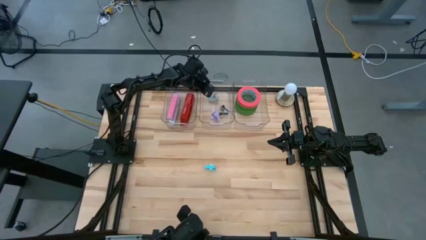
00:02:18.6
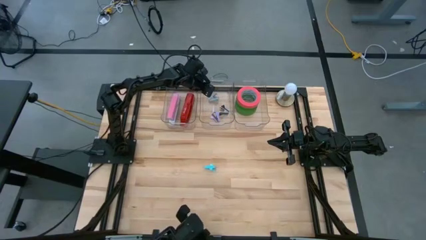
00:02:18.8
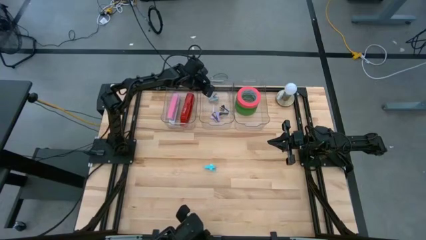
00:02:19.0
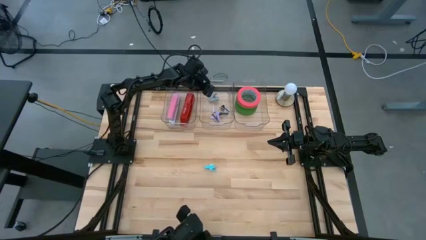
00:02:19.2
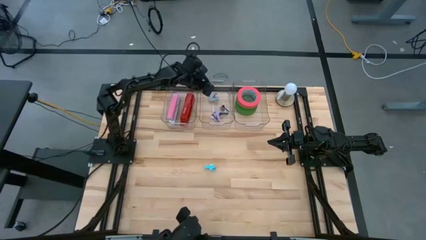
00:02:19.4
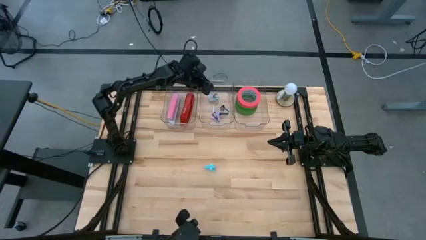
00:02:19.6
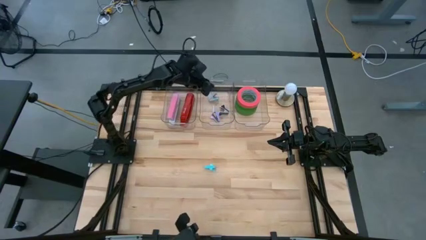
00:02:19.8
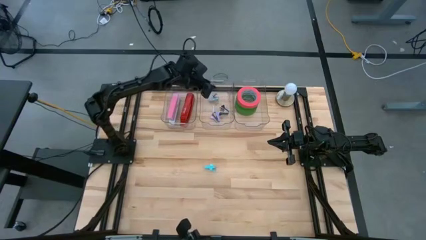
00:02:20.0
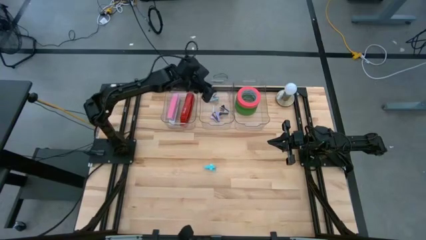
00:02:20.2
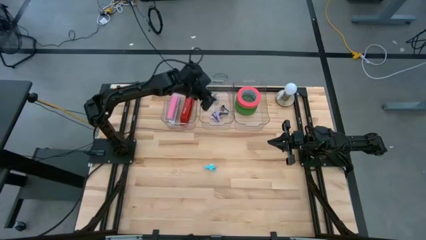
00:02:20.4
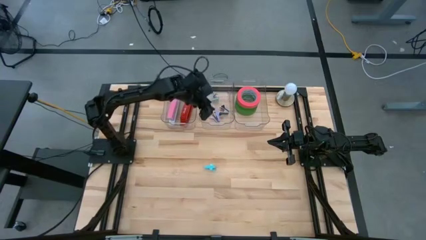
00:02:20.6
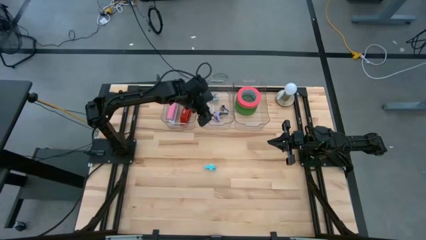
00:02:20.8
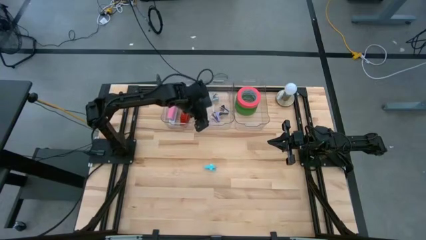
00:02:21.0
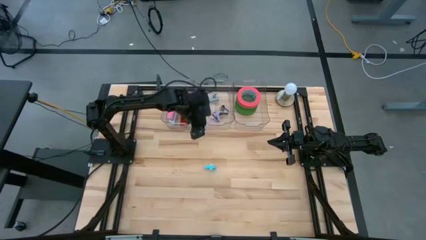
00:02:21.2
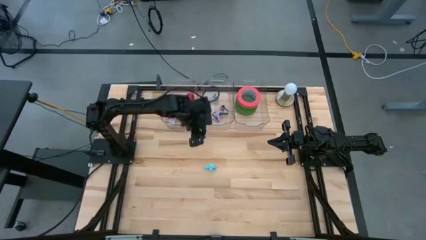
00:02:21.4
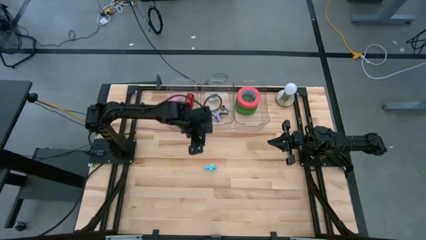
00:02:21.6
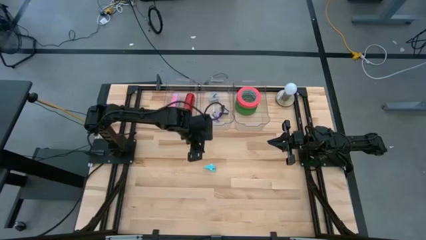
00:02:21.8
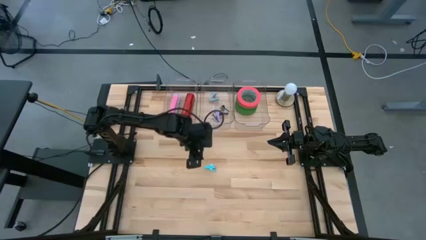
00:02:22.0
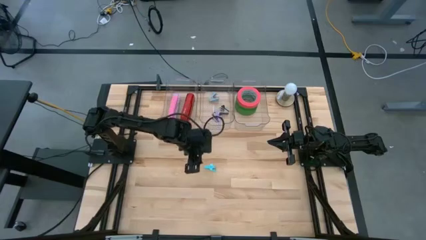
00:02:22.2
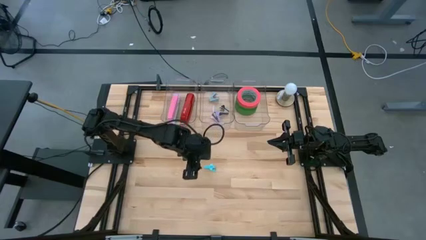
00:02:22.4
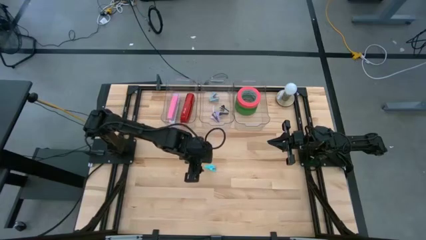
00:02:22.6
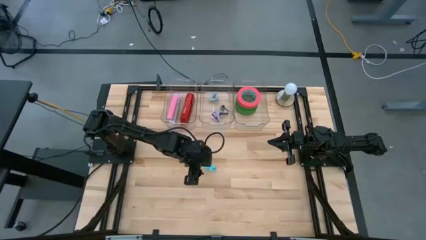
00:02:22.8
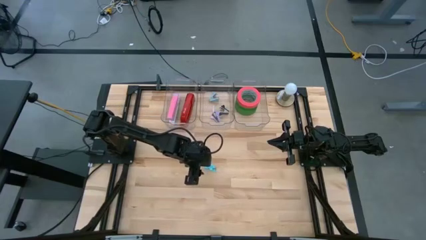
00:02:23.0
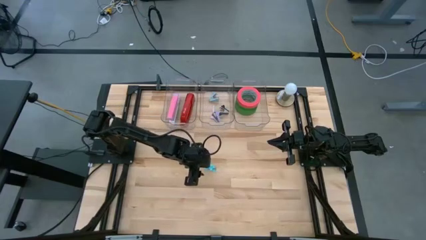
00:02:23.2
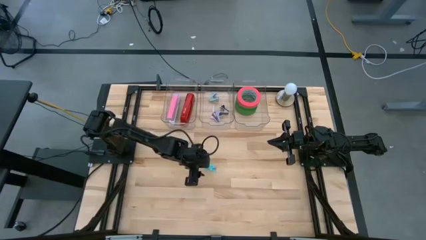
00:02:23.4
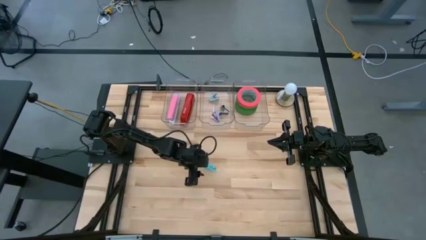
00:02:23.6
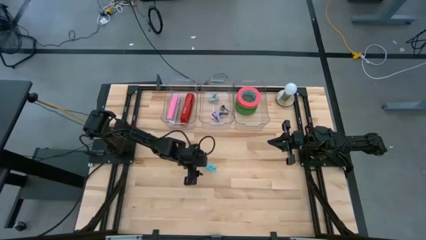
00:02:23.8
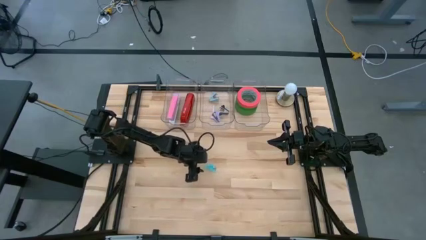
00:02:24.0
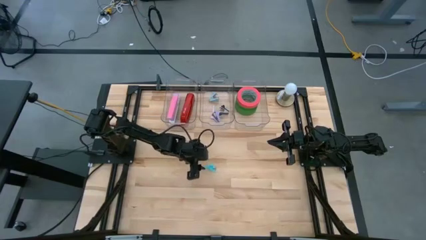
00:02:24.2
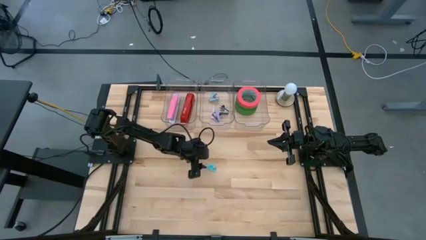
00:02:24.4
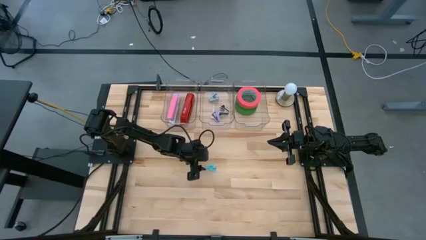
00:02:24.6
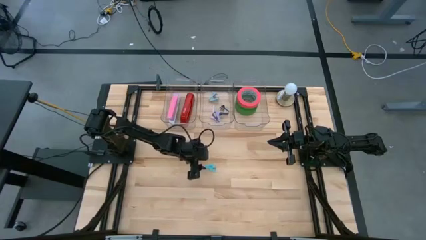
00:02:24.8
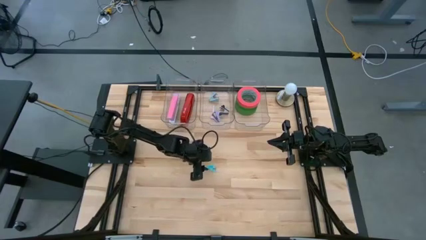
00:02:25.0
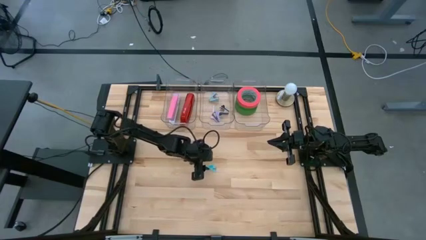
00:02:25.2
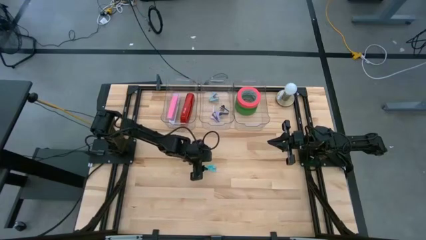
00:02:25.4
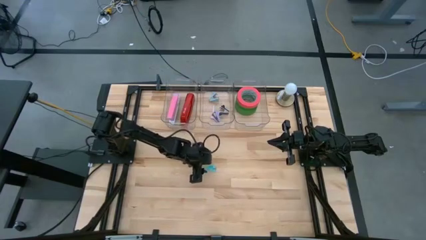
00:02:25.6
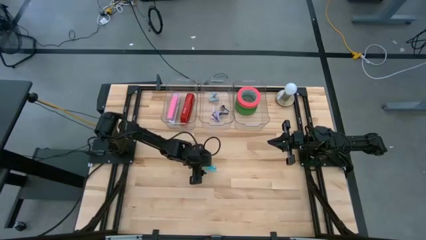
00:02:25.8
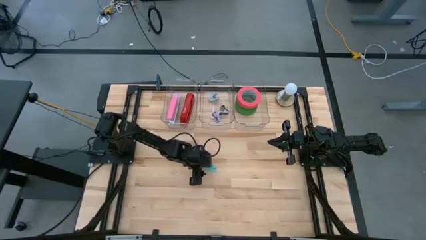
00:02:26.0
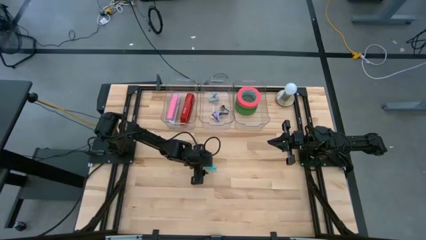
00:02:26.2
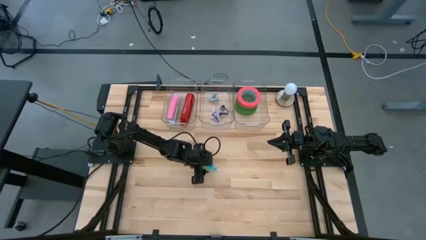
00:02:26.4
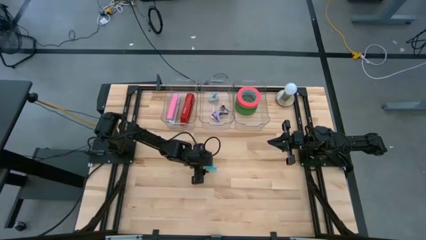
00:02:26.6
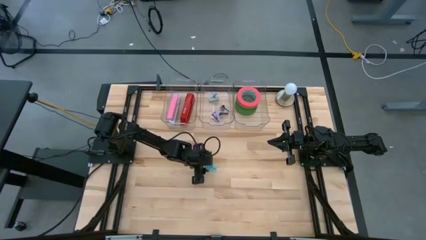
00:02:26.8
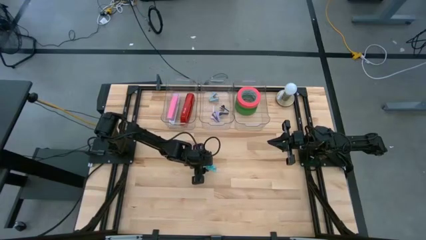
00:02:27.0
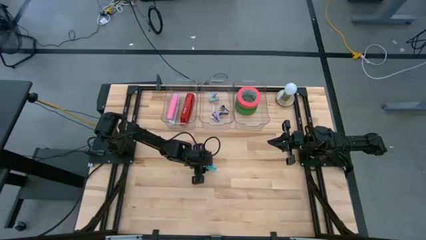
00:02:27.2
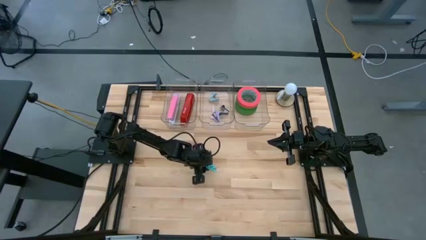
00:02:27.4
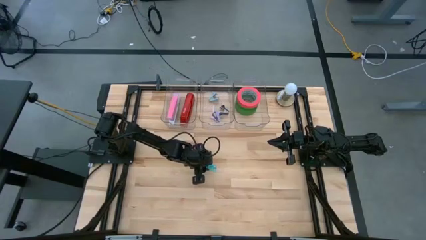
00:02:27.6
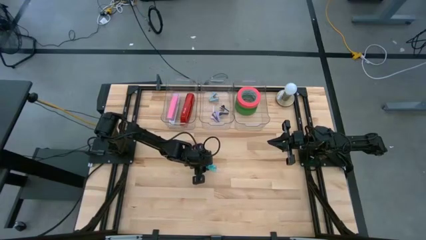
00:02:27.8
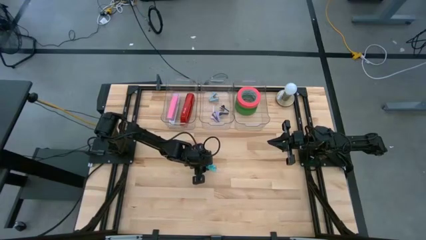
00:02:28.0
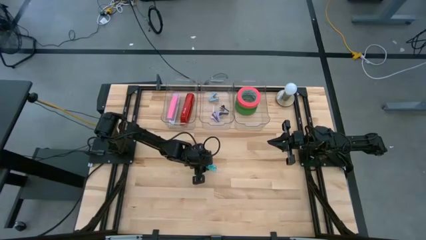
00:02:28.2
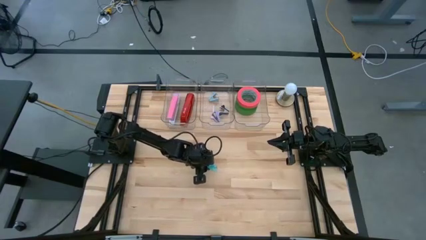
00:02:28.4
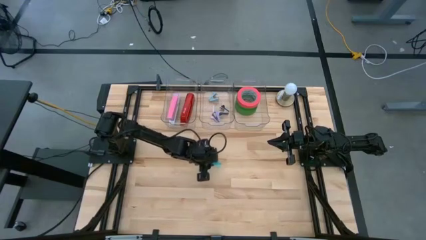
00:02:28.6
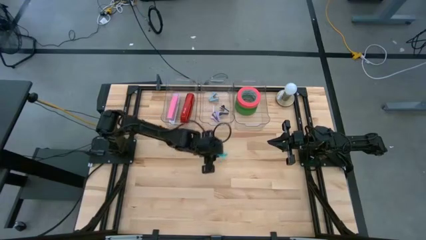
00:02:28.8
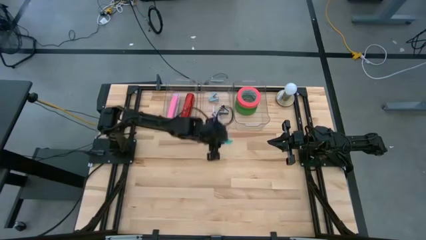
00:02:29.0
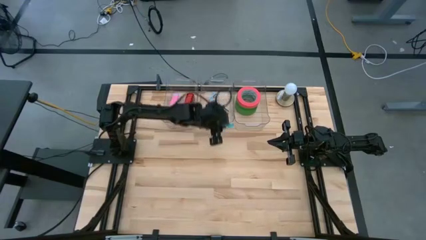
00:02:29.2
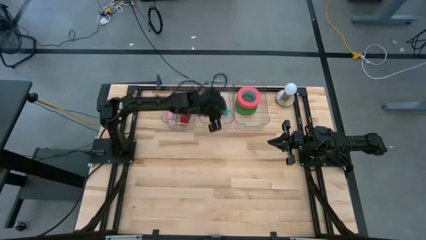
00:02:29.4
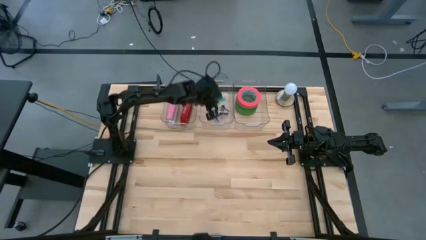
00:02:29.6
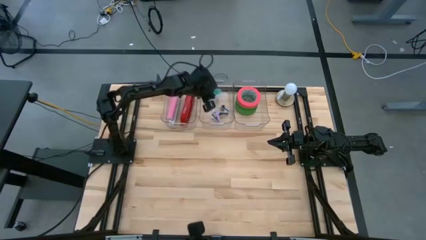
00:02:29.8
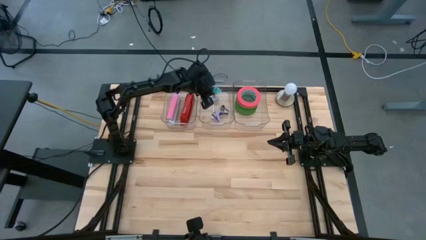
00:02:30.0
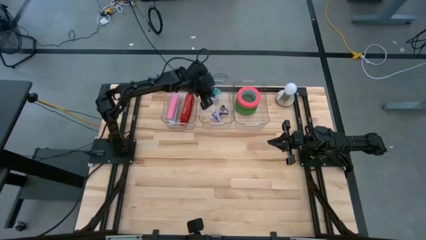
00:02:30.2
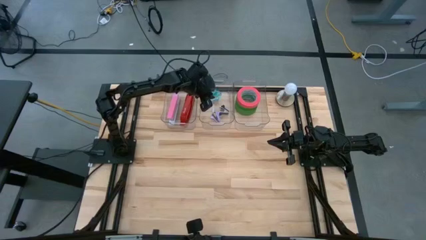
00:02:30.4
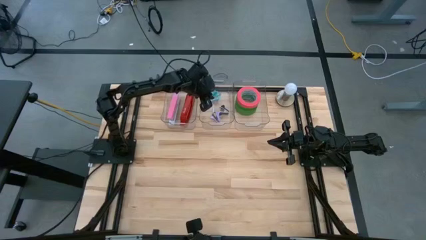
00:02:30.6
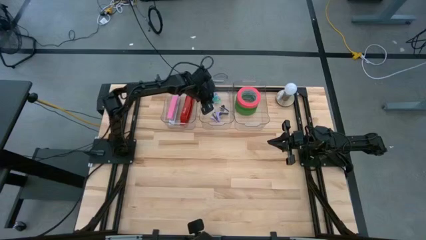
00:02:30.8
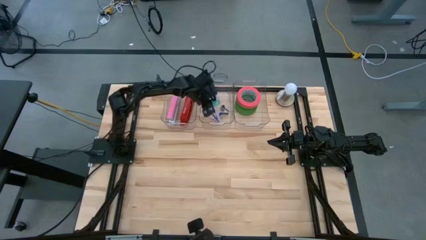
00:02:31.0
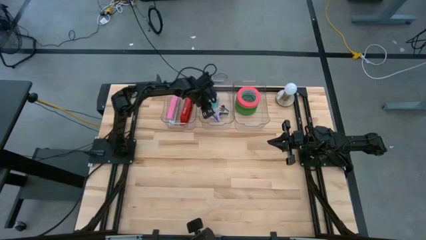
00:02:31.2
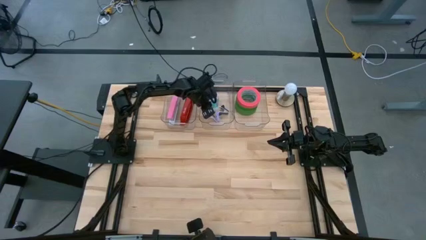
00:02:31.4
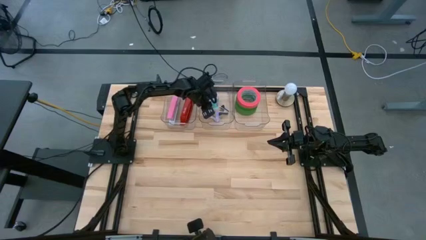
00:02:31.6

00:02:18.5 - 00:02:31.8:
Task: Pick and place Stapler, Stapler remover, tape
Put the light blue staple remover into the middle transparent bin

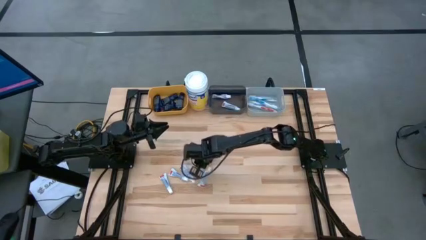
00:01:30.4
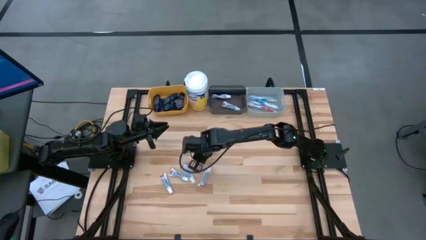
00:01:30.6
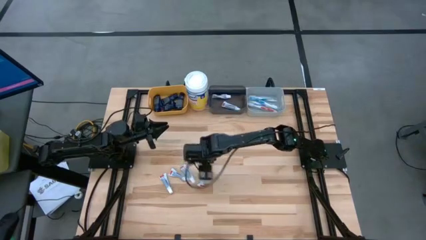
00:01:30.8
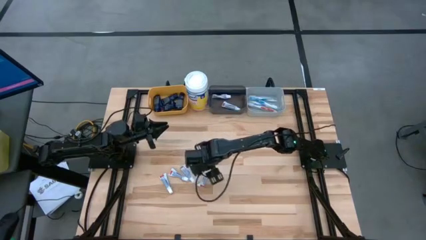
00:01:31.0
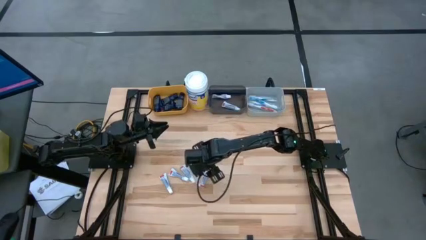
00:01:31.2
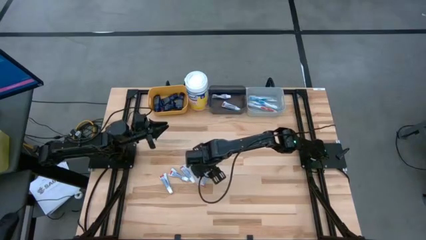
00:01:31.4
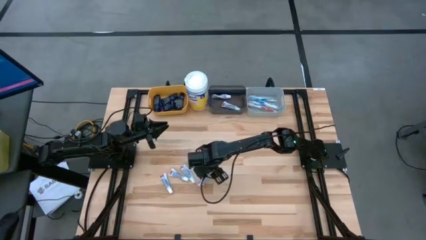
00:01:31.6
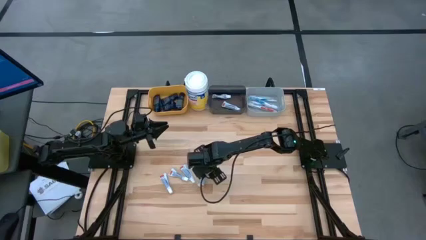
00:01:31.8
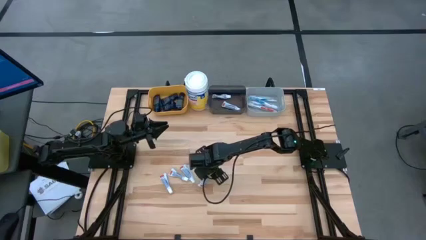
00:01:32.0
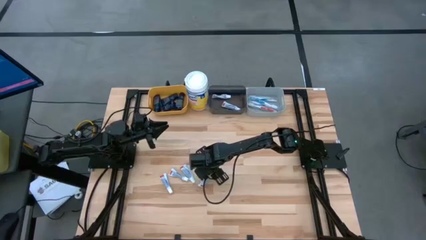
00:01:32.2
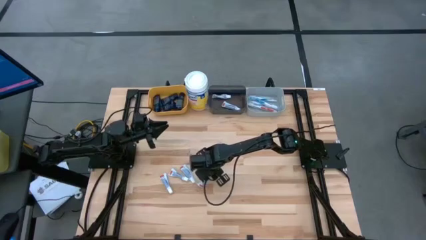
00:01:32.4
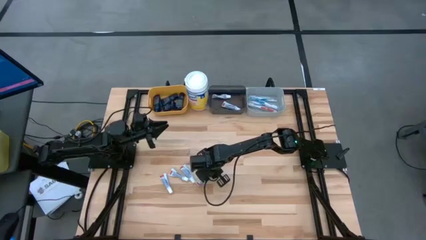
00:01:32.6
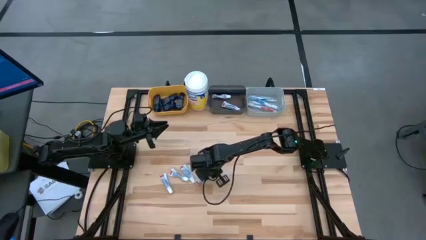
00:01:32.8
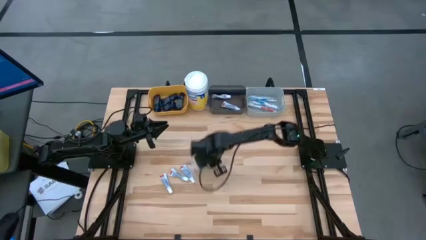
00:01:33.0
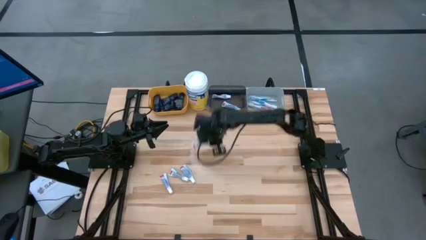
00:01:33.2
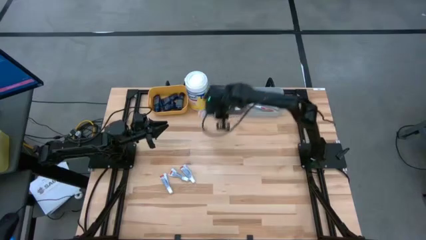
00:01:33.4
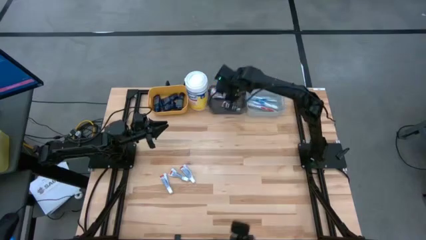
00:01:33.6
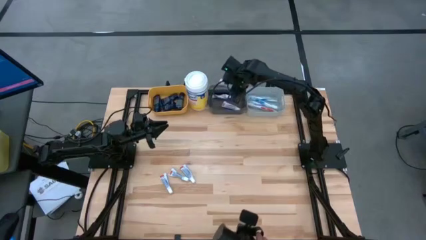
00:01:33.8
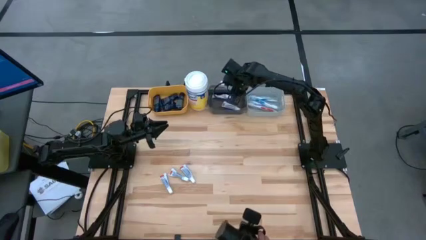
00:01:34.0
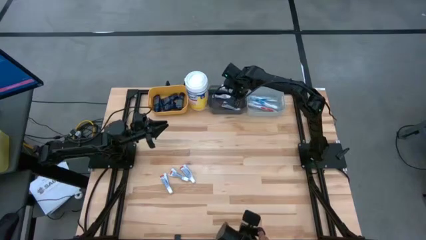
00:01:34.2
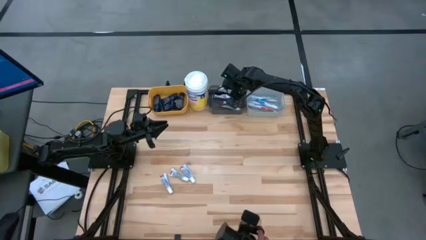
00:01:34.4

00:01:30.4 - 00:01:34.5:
Task: Pick & Place Travel size toiletries
Put the white toothpaste into the black bin
